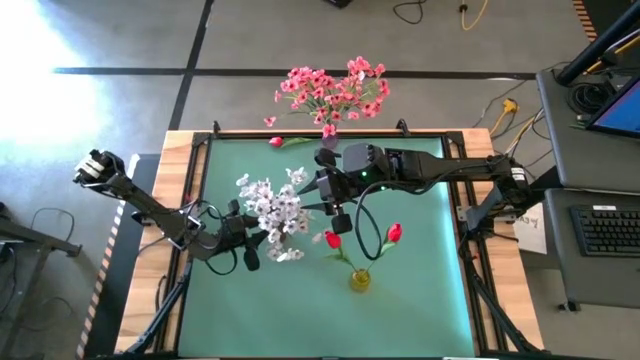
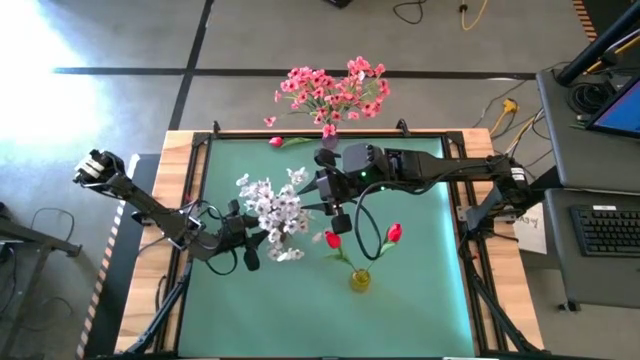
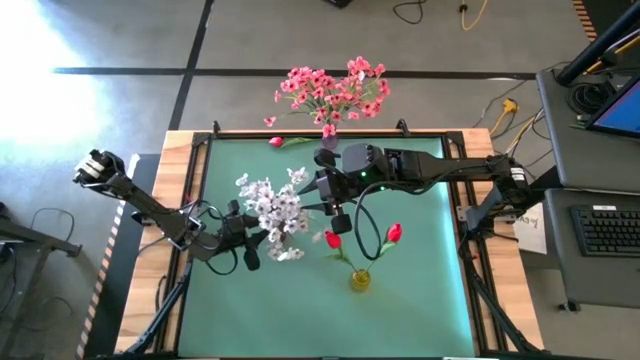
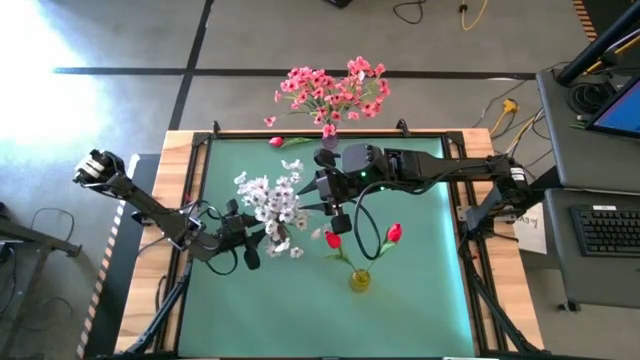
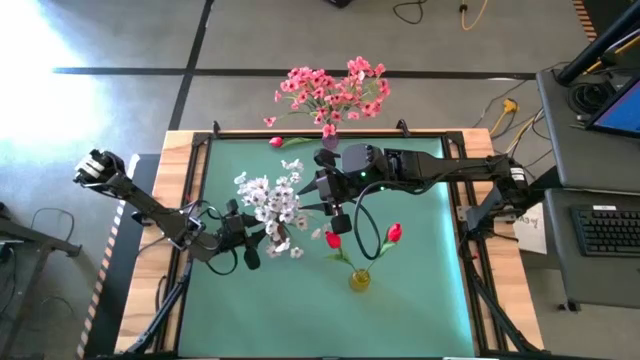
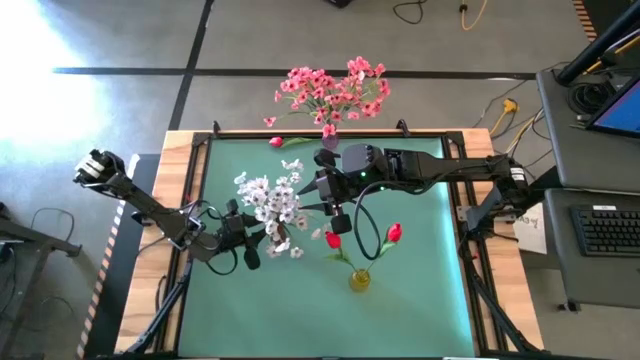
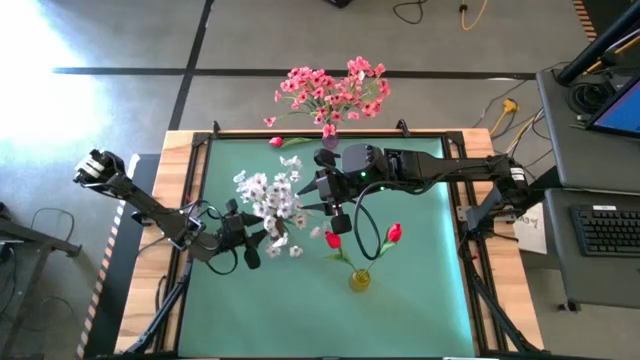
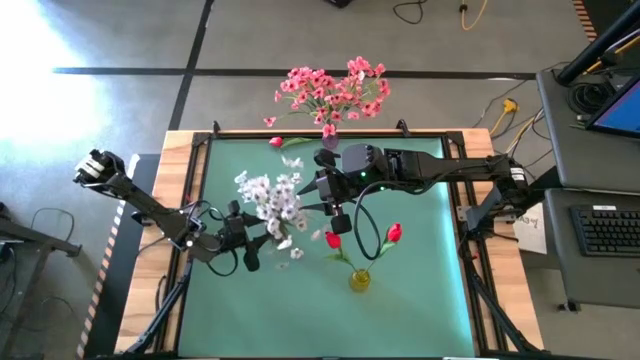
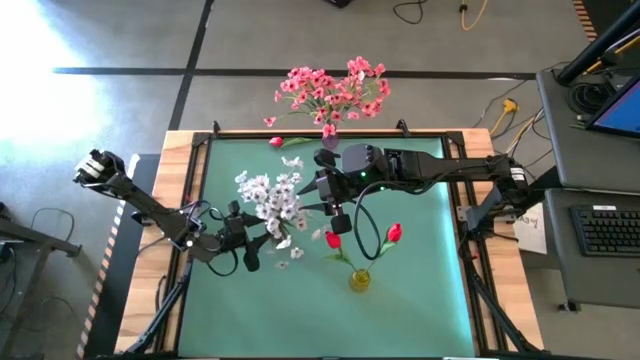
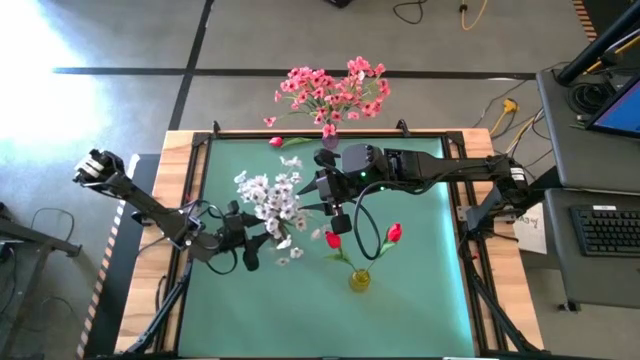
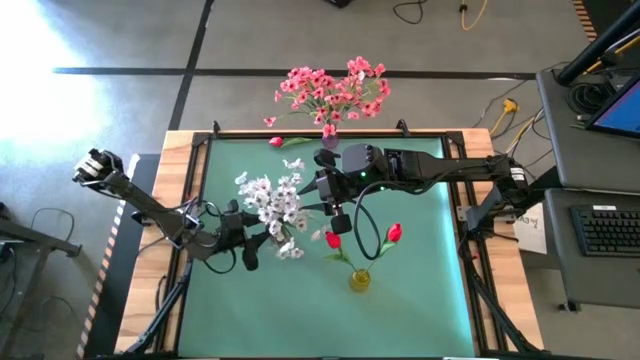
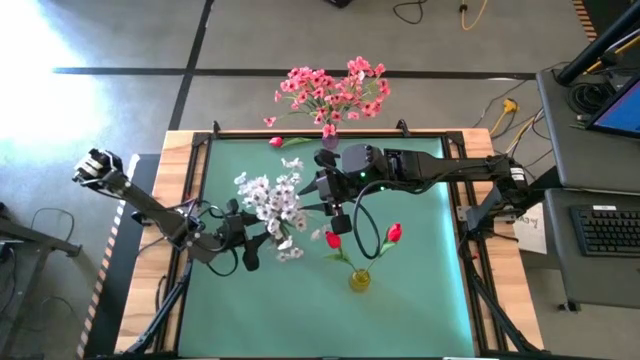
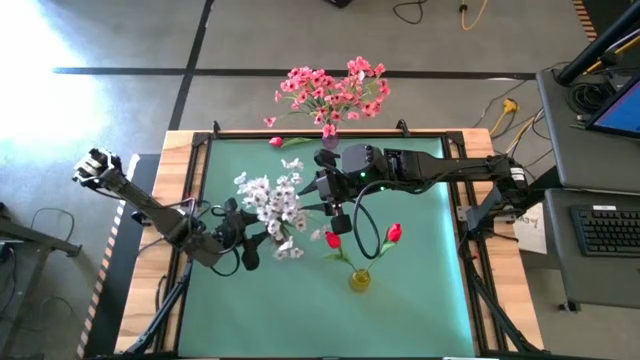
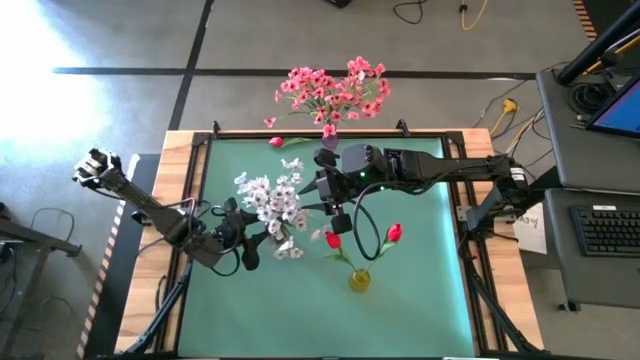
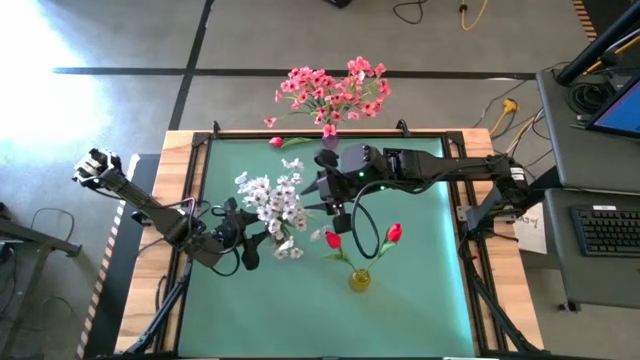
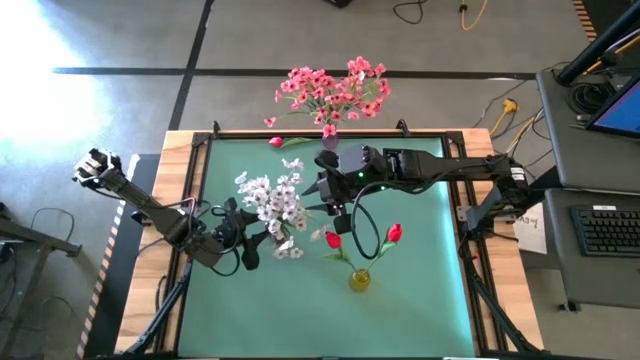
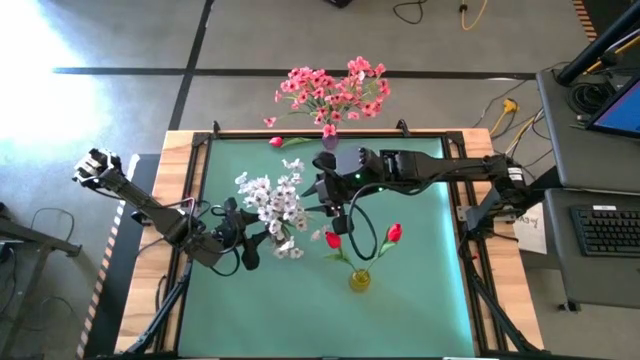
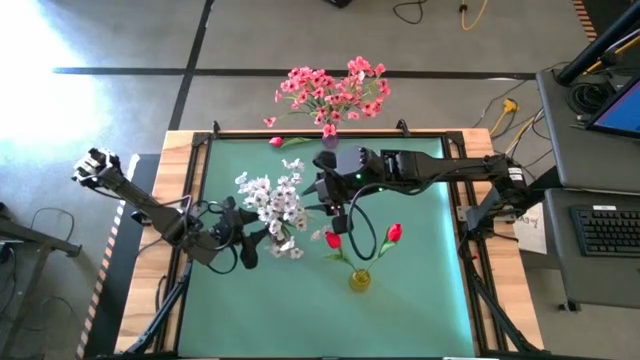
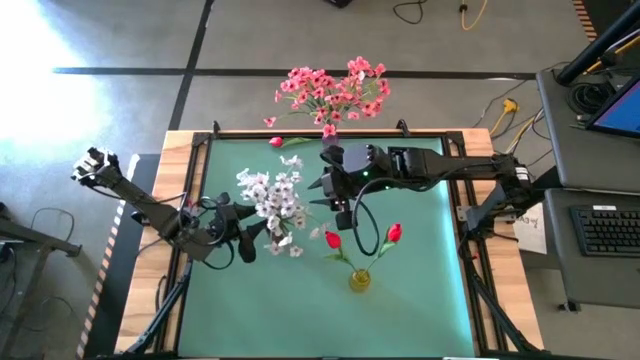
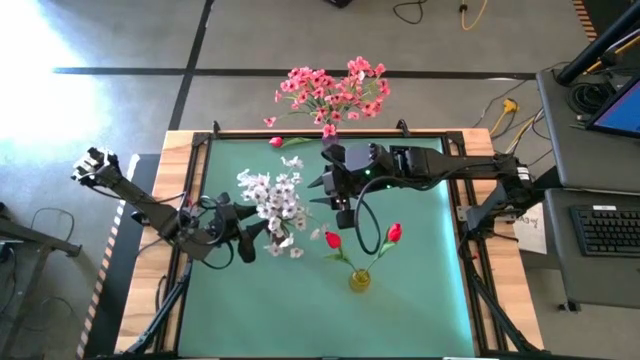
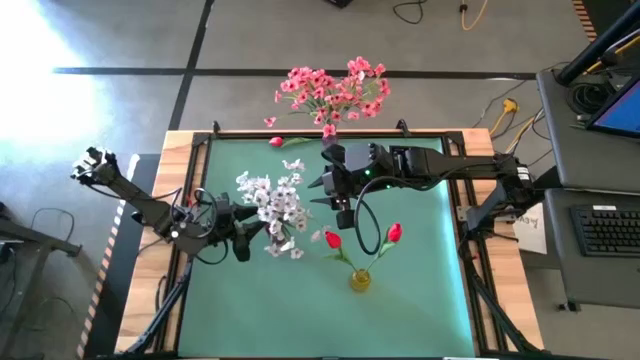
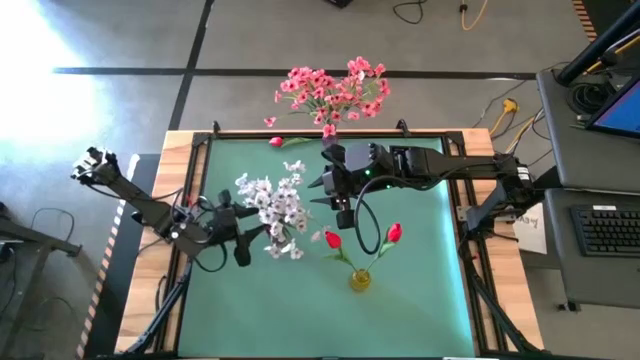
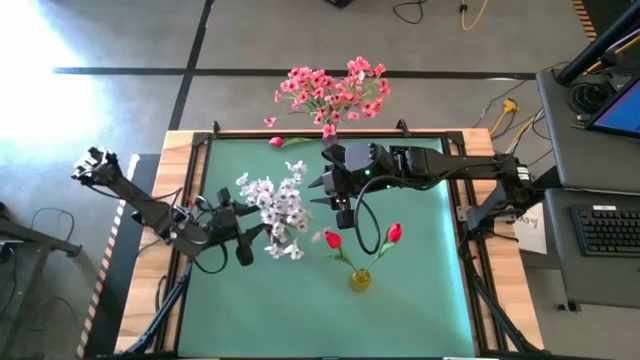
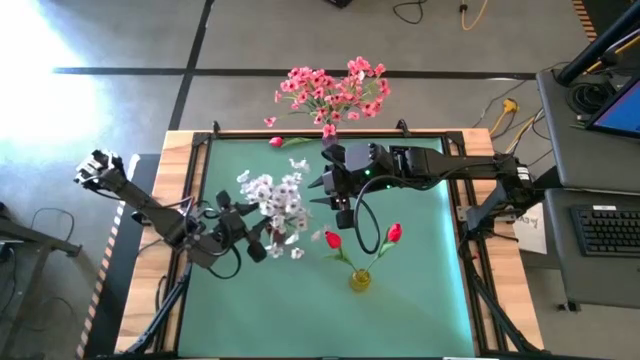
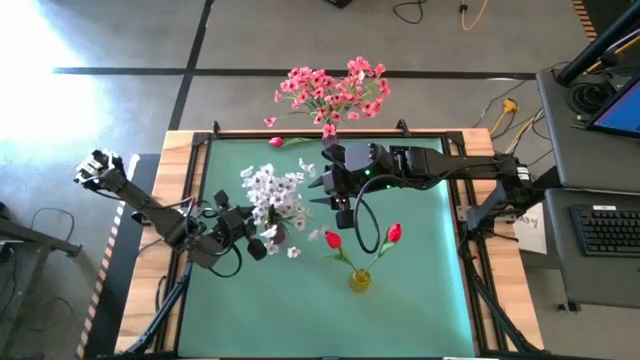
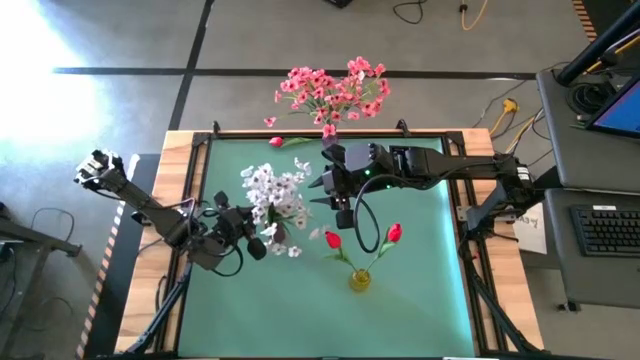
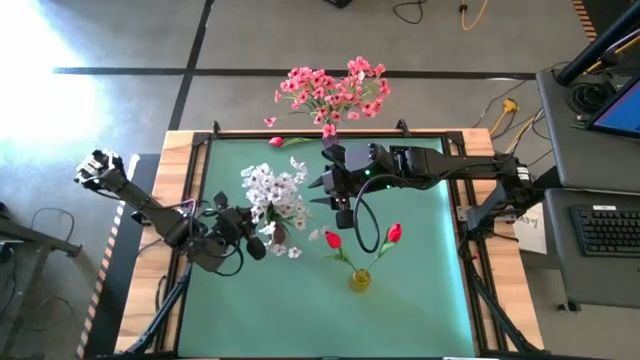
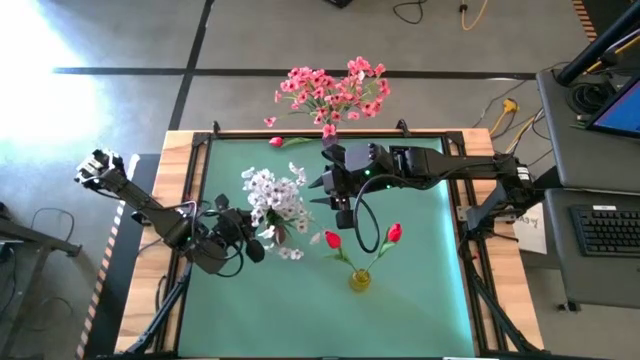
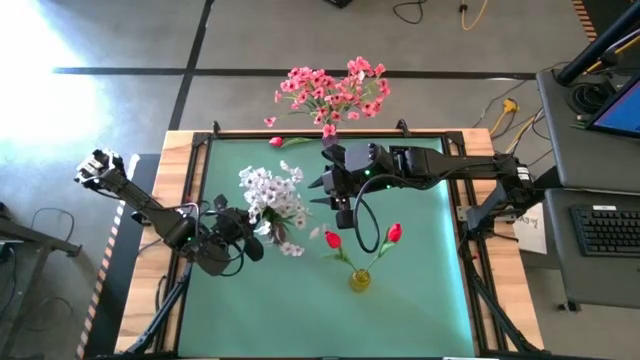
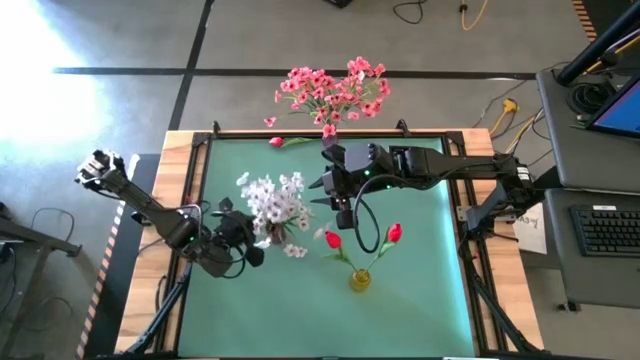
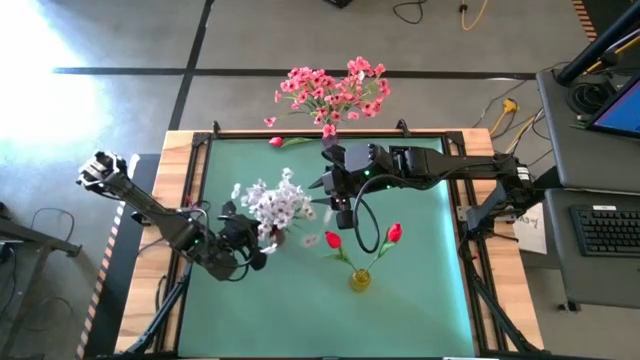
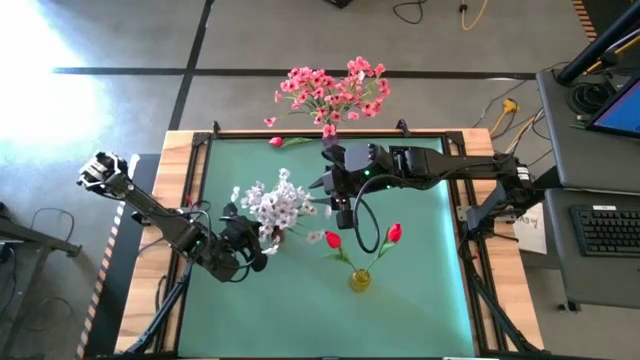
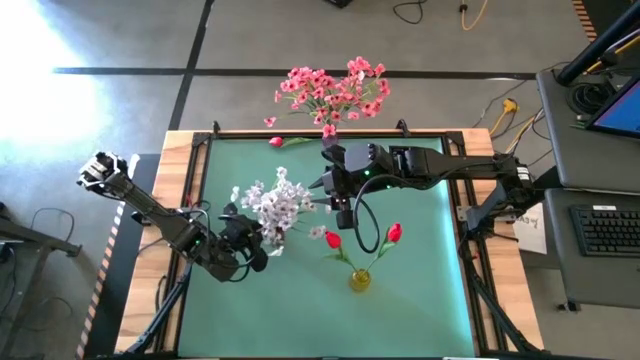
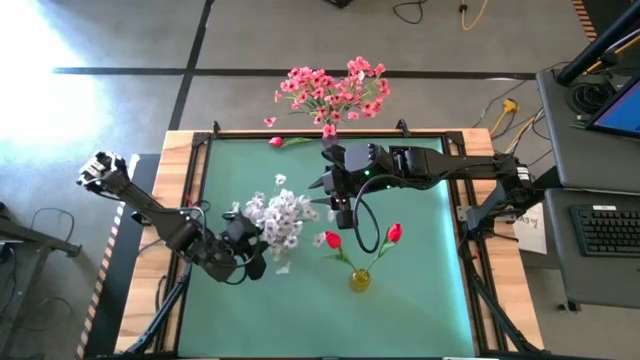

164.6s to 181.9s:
Task: Sort flowers into vase by color
Put the white flower into the red flower vase

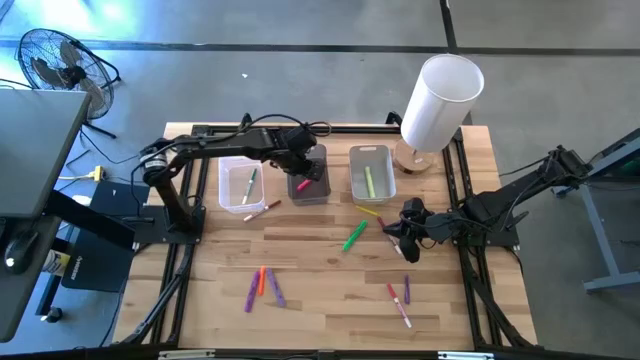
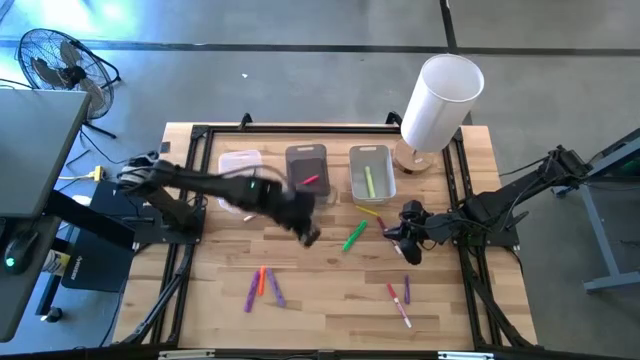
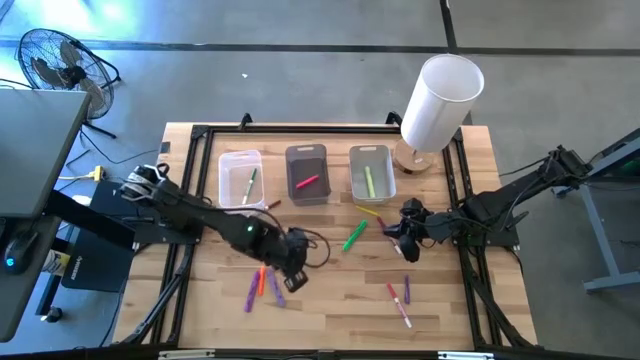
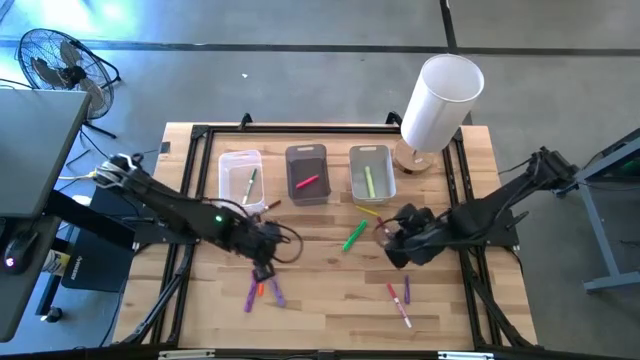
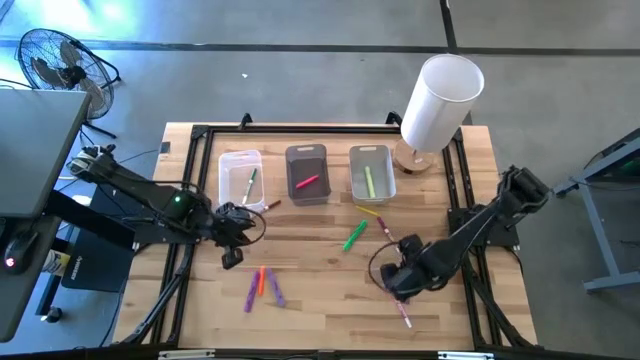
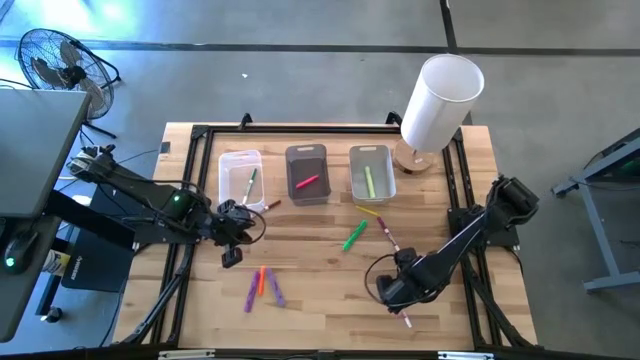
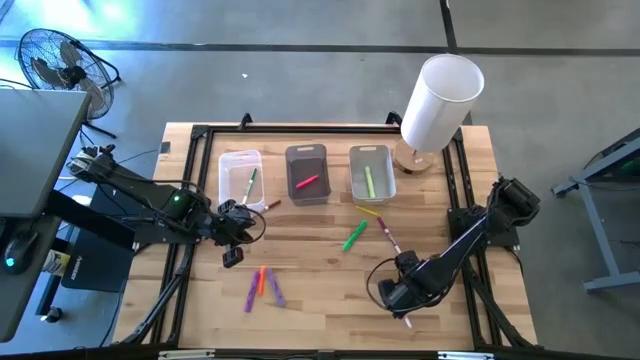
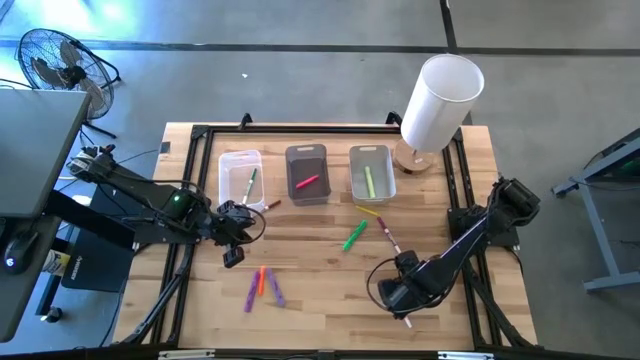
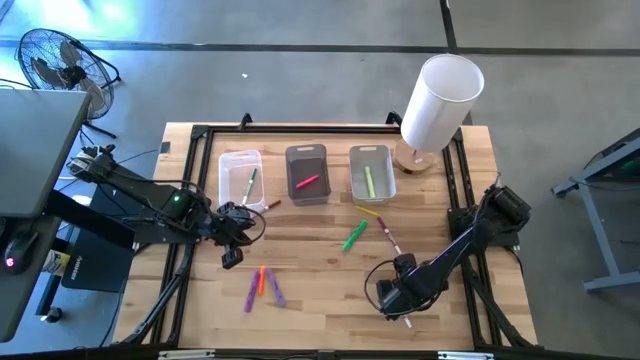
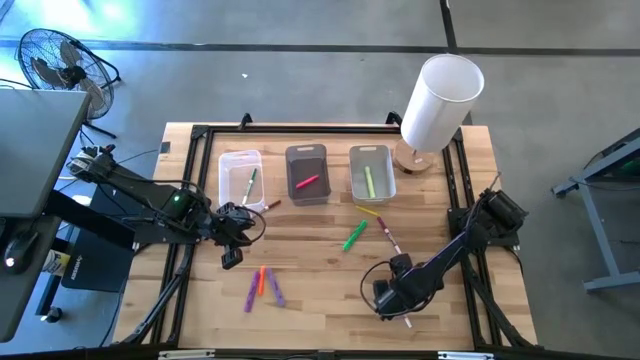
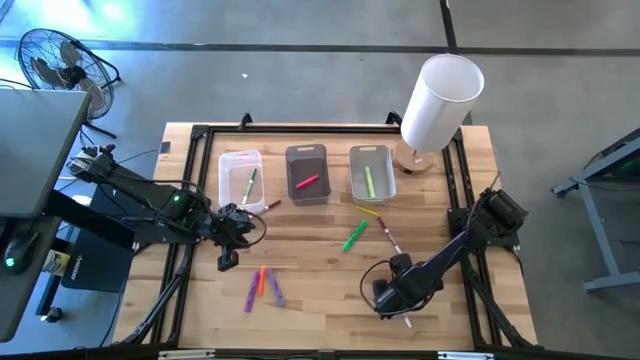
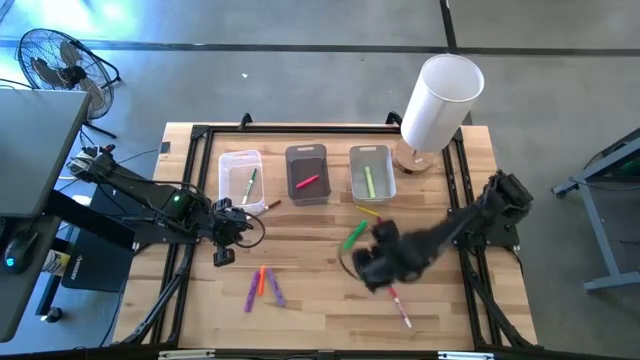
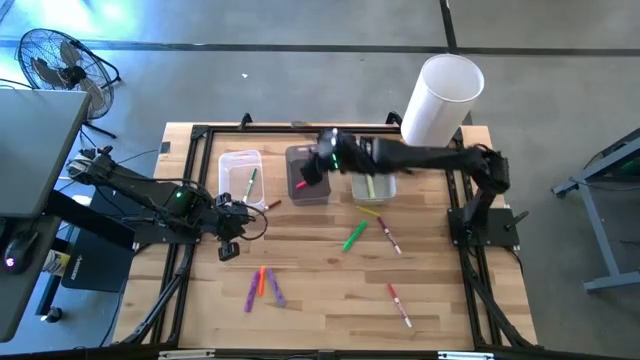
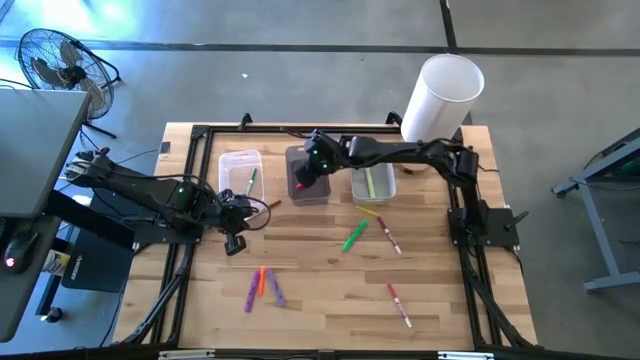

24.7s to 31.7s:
Task: Pick & Place Markers
Put the blue pen into the black bin
